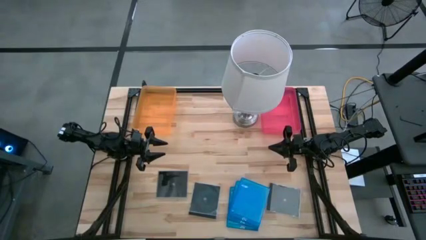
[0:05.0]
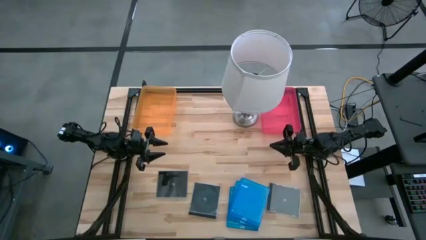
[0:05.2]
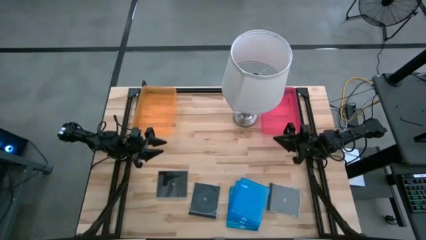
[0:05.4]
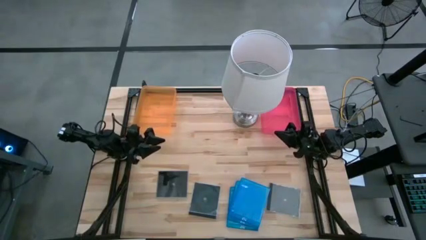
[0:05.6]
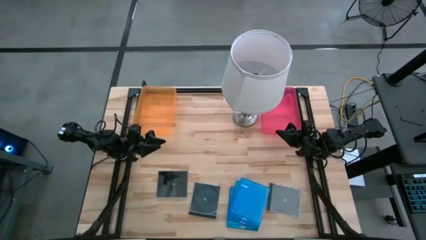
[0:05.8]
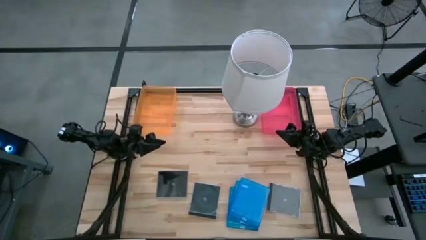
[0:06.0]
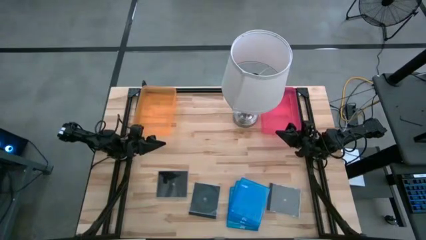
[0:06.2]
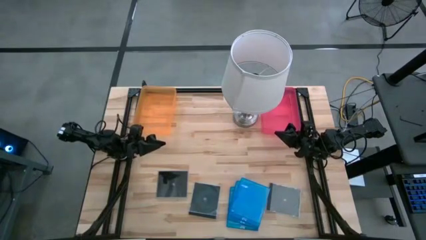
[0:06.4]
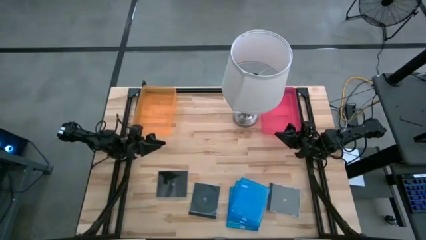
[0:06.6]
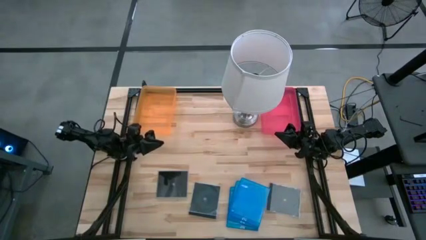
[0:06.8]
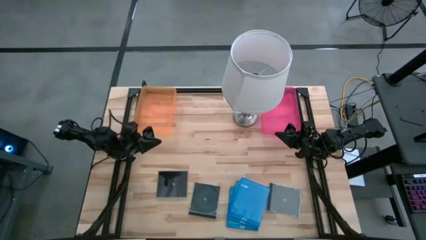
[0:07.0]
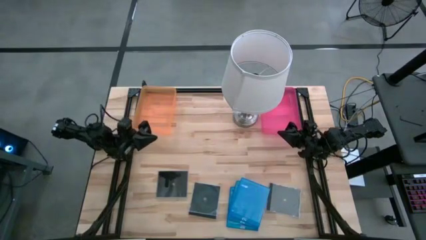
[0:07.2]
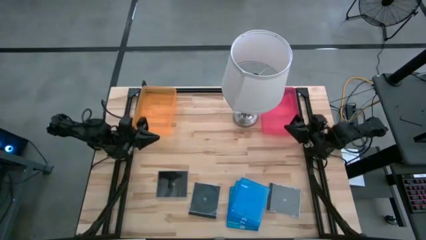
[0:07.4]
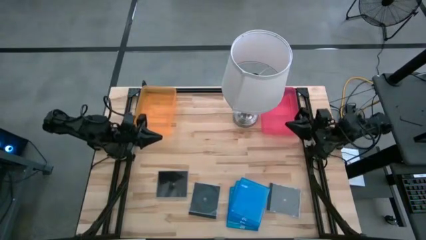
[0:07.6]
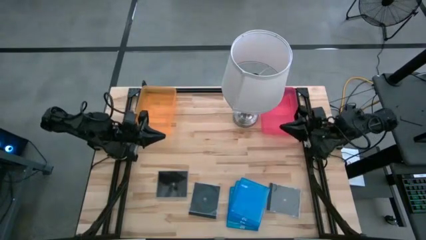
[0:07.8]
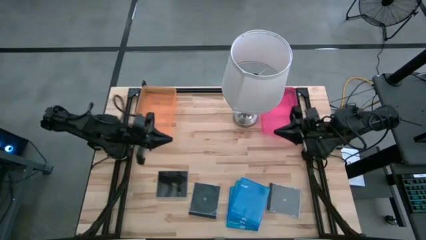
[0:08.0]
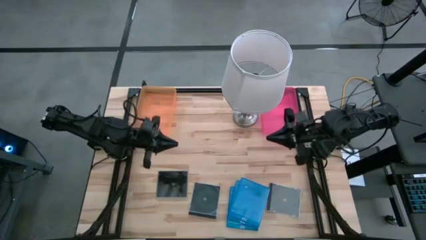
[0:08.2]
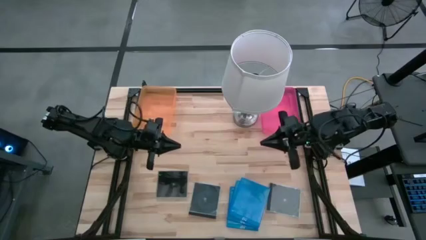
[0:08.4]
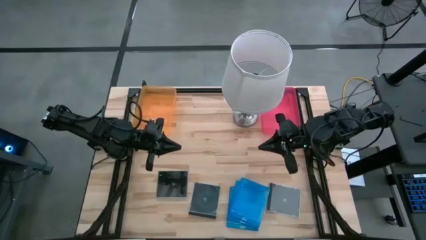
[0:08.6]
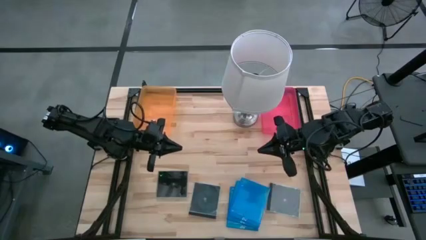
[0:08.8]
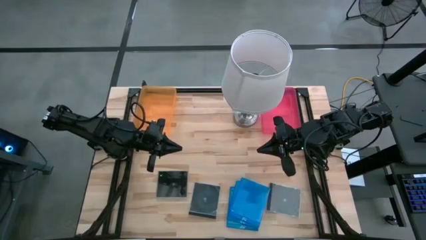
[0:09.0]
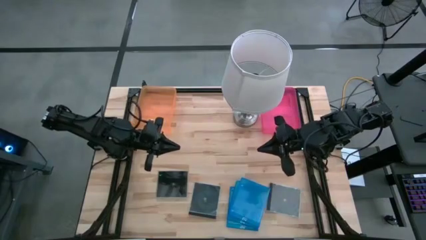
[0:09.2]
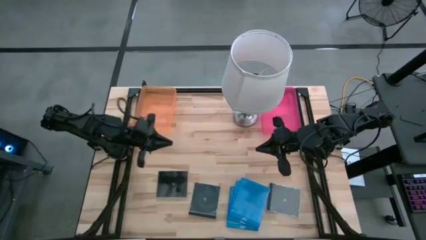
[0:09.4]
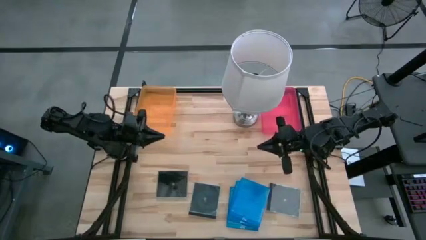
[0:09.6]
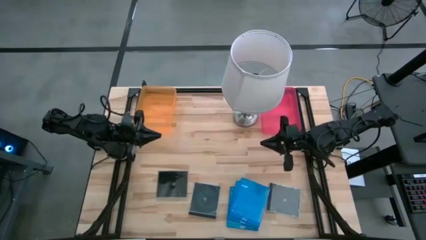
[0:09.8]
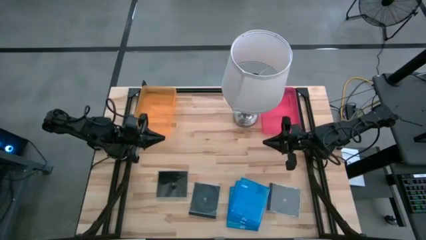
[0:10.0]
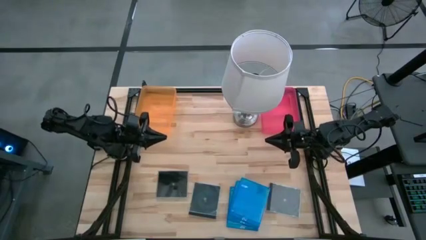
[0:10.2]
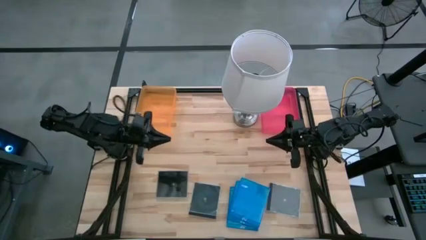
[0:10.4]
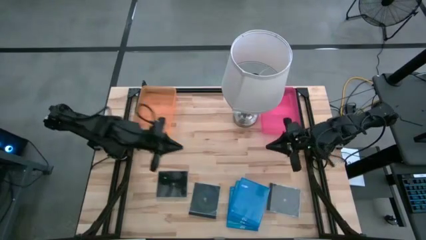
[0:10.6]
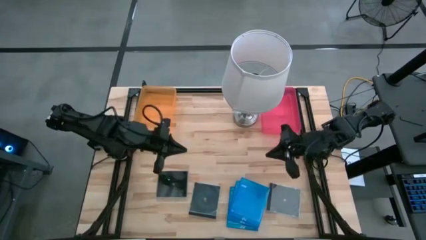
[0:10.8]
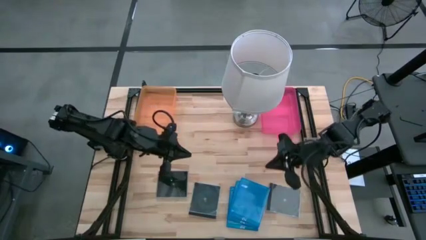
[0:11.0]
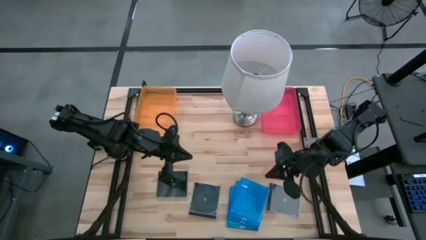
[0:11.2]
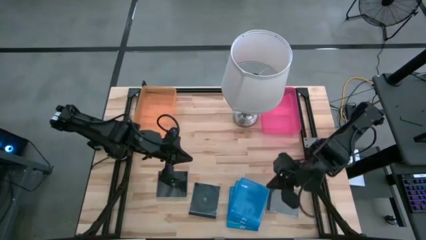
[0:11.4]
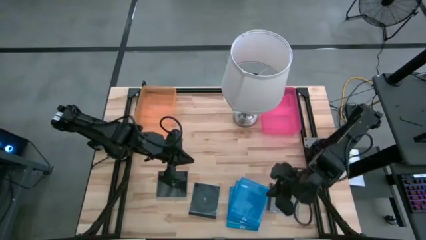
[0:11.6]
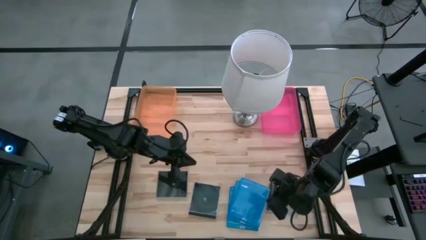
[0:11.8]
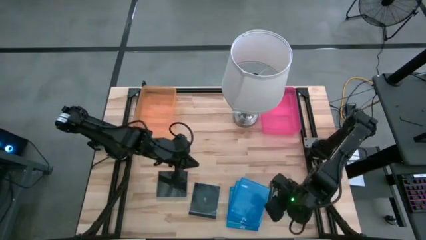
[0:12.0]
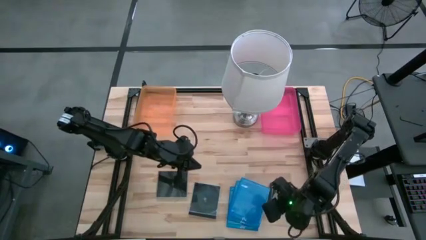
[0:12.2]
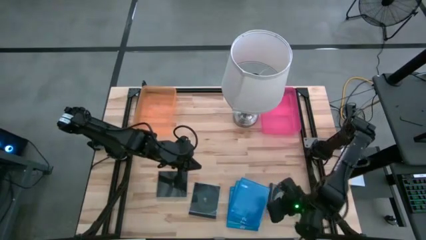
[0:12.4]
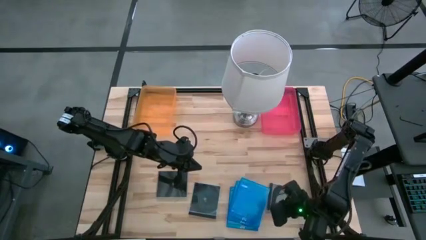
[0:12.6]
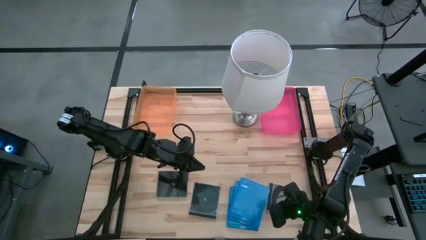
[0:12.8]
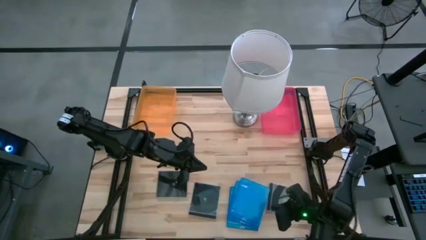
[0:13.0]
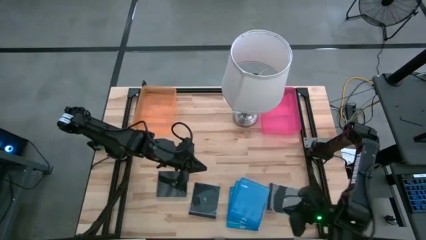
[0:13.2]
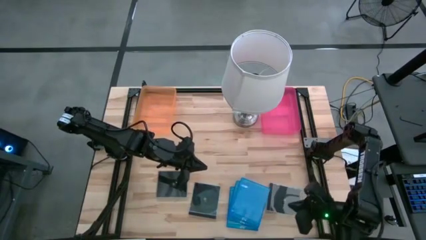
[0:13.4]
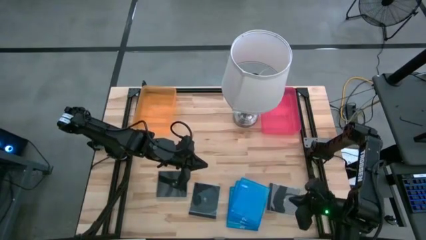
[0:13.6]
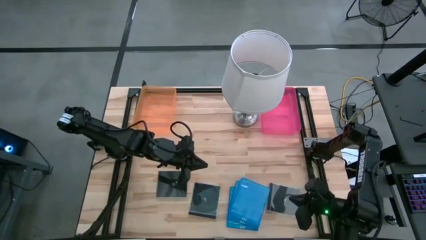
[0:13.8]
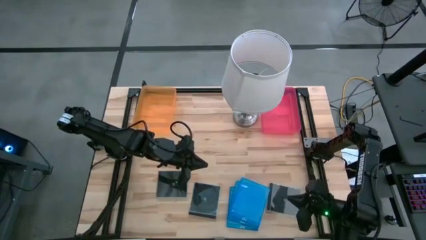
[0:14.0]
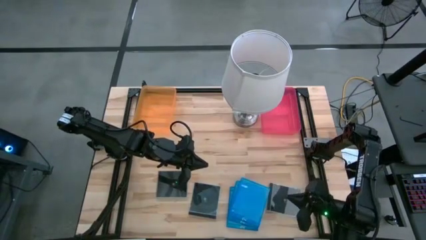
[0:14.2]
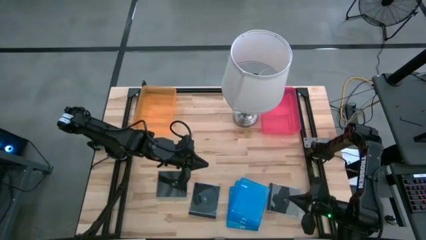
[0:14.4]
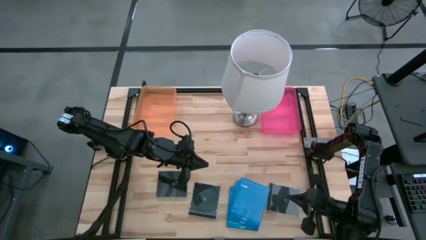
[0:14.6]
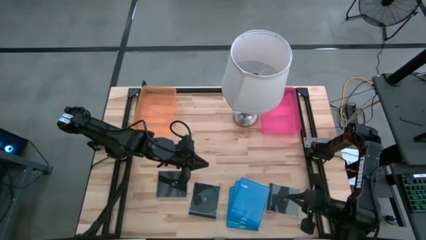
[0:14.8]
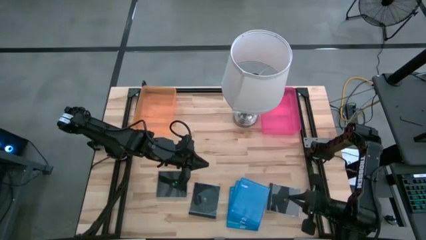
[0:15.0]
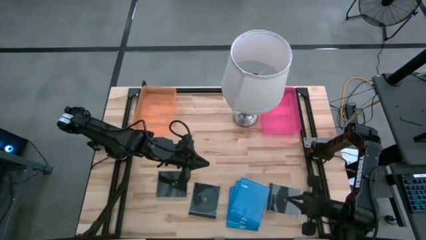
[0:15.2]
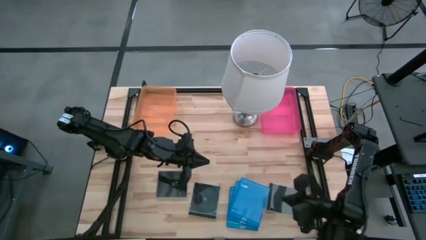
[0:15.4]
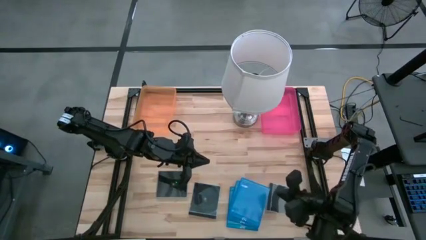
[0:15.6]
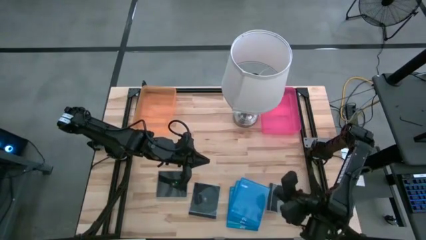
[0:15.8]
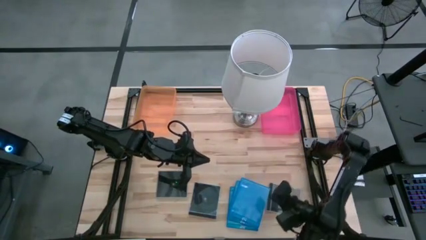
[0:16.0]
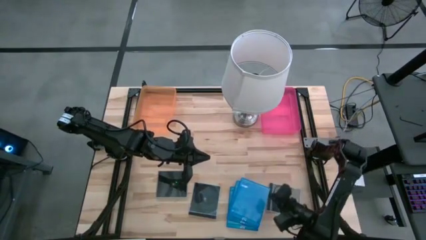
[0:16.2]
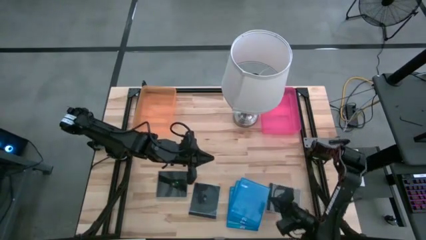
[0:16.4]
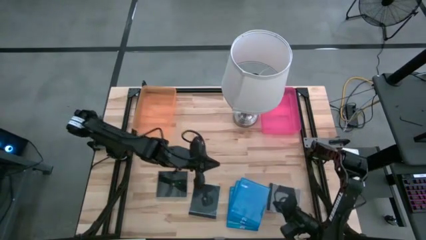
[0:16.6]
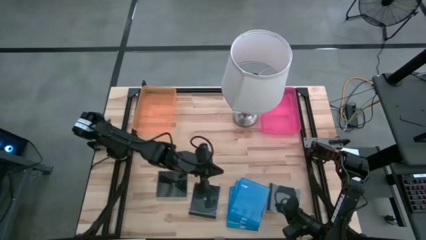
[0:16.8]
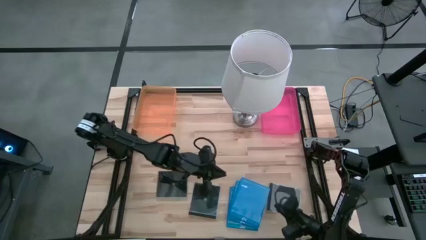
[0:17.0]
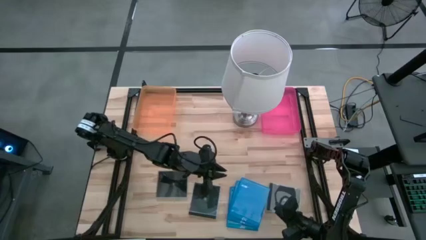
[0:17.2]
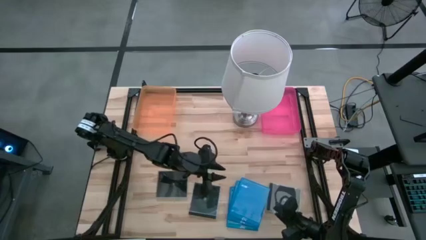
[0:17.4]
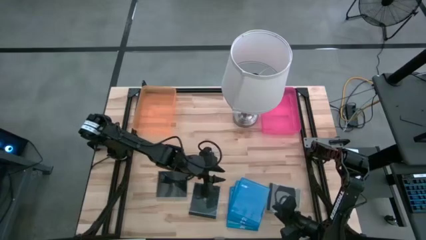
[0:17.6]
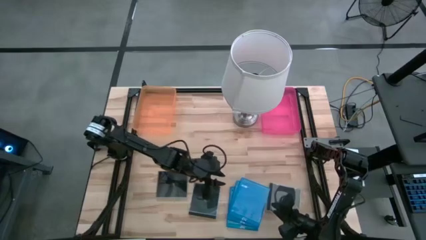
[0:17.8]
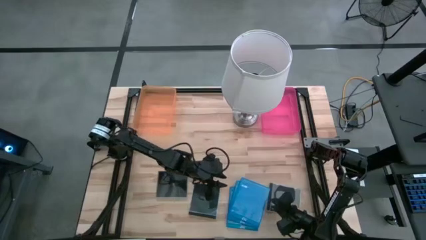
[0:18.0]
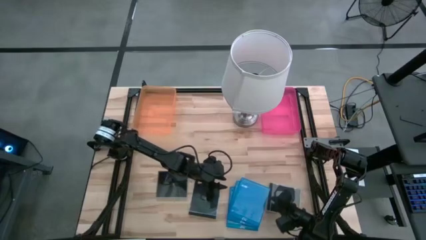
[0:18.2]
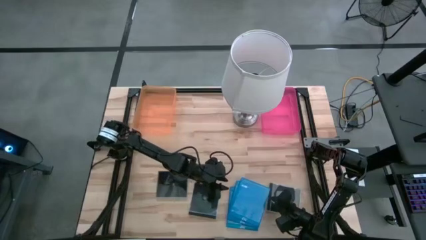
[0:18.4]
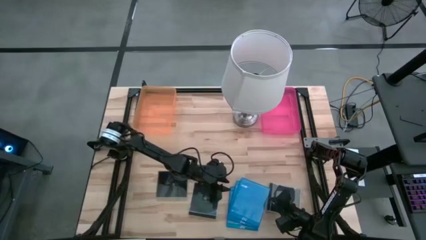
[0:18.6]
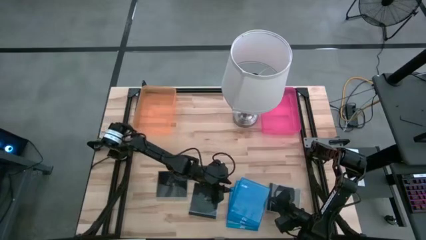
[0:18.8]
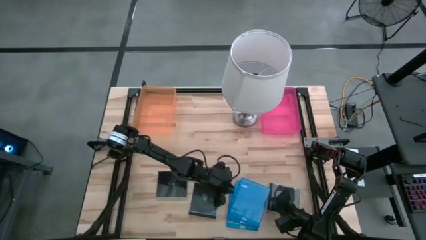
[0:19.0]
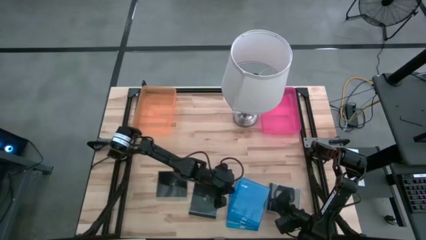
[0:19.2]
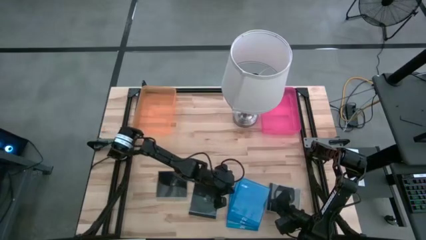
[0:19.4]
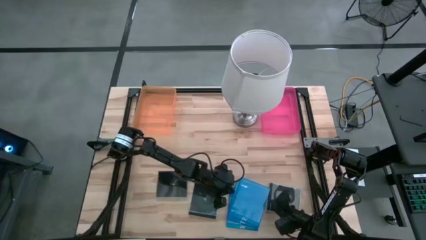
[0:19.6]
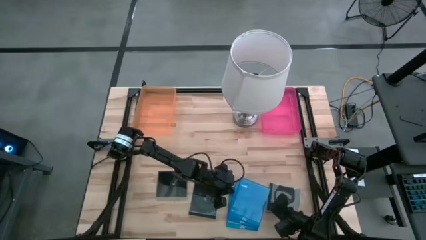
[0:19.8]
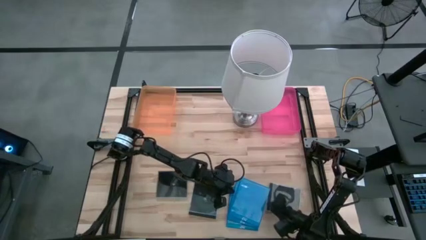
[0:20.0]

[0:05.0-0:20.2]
Task: Pick & place jewel cases by type
Put the blue cd case into the orange bin
